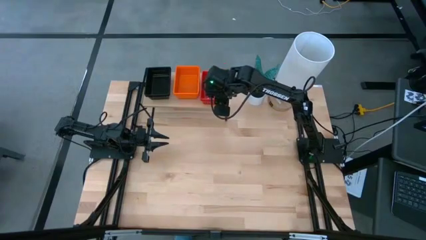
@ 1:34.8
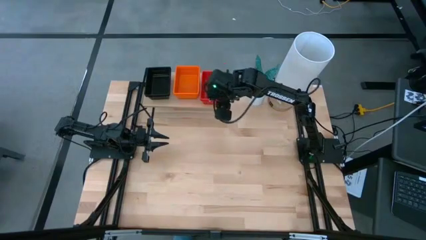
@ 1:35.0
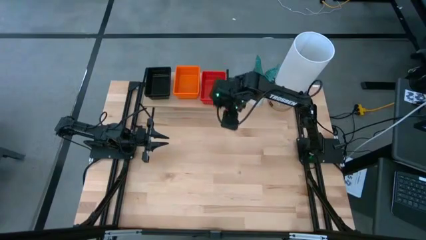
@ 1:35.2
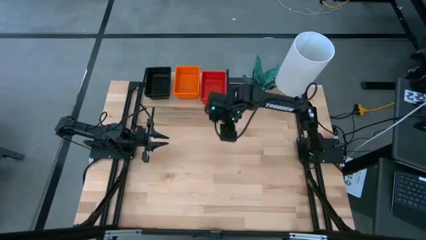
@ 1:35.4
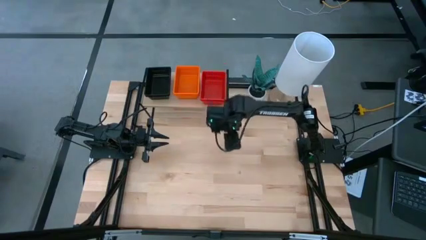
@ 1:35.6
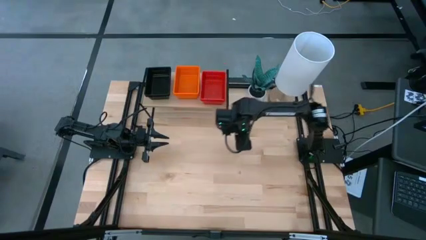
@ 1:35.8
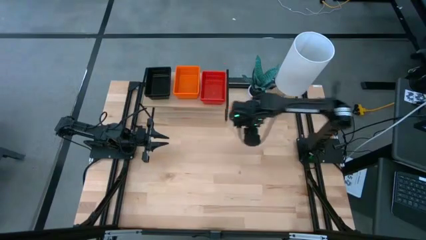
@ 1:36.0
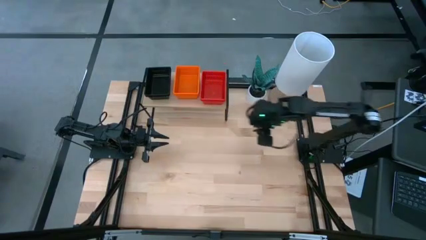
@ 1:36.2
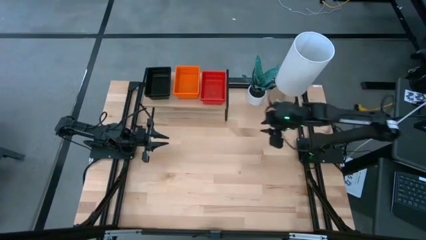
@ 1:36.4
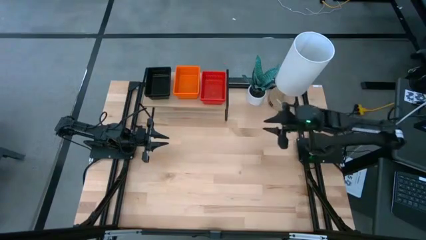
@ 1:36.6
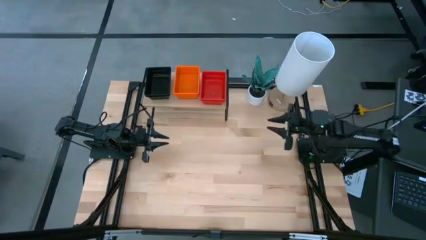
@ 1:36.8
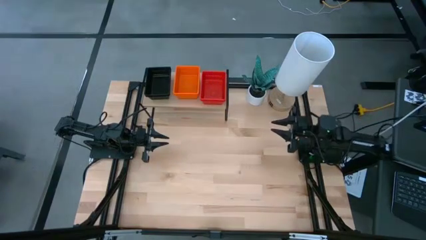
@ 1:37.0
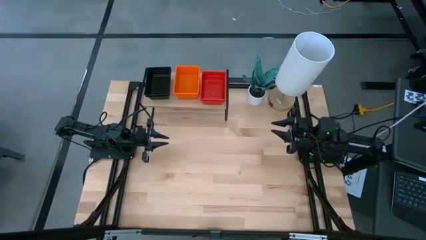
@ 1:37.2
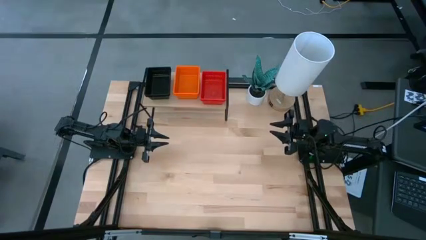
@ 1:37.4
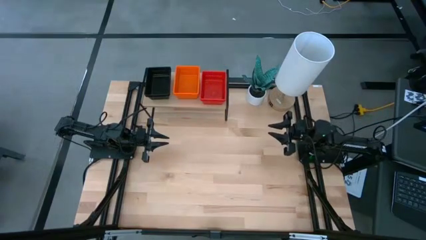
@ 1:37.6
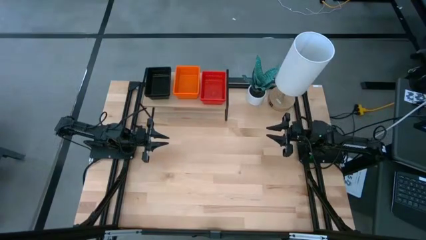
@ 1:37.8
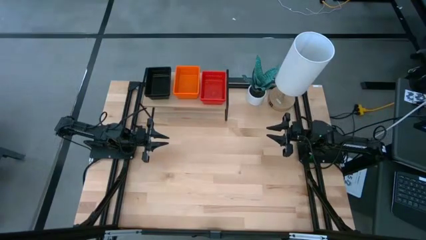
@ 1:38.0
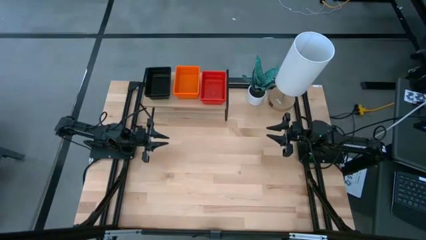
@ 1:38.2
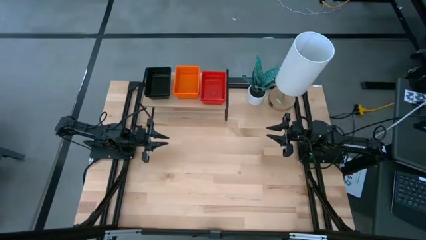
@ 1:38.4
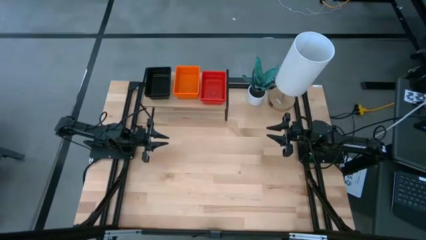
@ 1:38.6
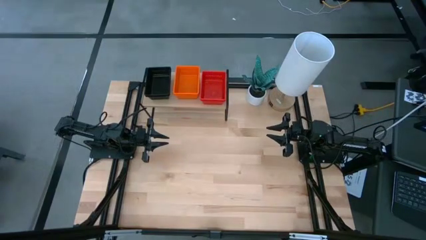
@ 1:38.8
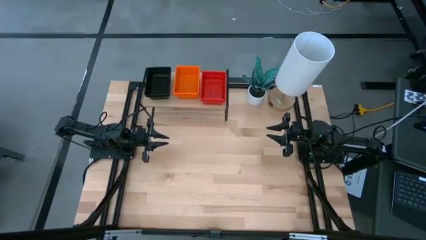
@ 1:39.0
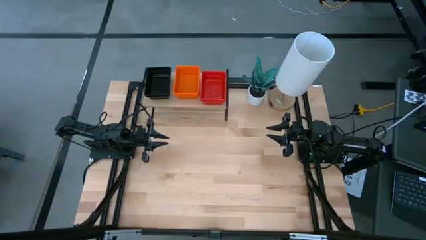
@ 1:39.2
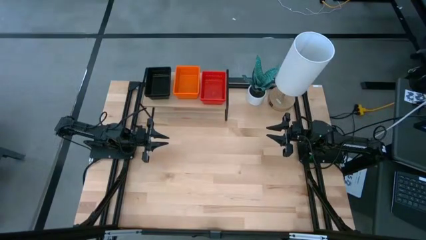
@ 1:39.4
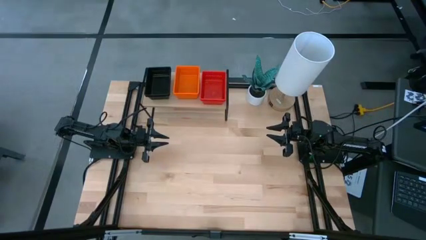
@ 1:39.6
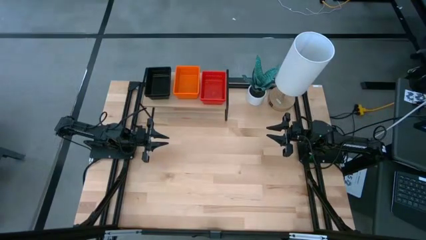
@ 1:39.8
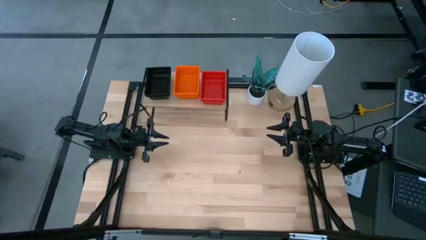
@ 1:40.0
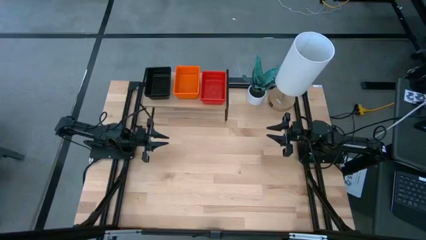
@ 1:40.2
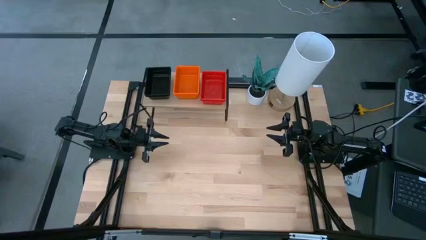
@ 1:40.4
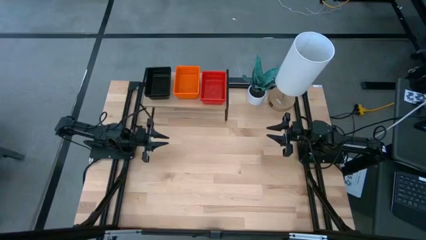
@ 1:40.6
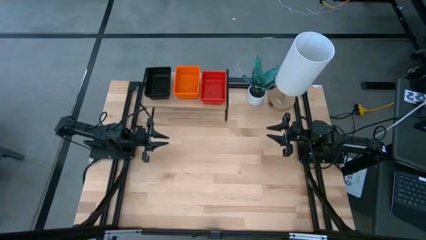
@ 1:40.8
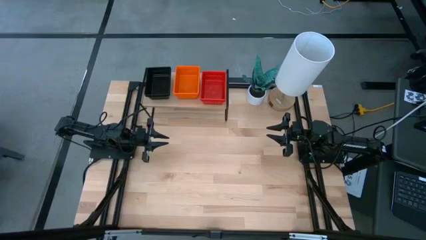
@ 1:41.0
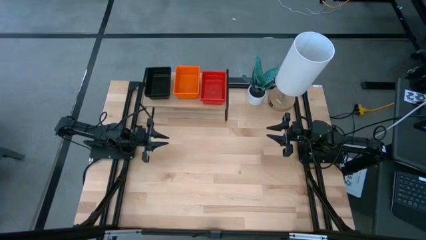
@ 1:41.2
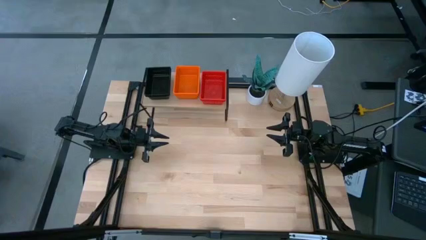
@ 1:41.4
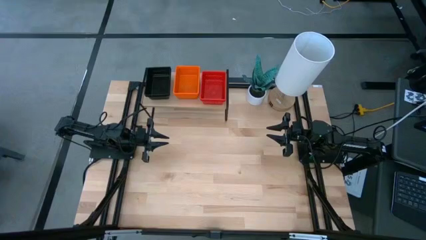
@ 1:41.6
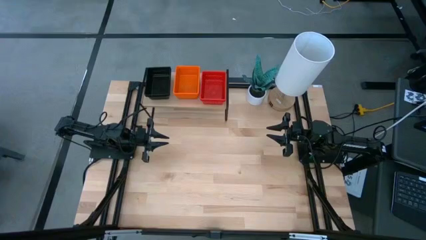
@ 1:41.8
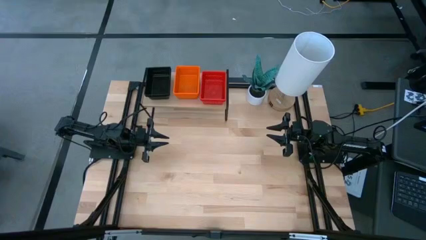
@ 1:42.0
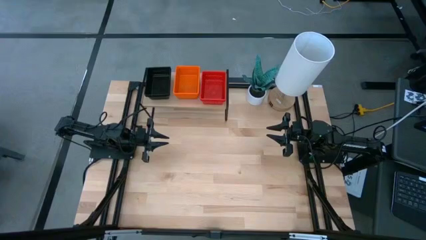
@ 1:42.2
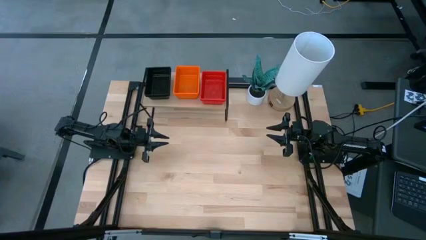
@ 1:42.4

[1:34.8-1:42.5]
Task: Stack baskets on shelf by color
Return to Home Position
